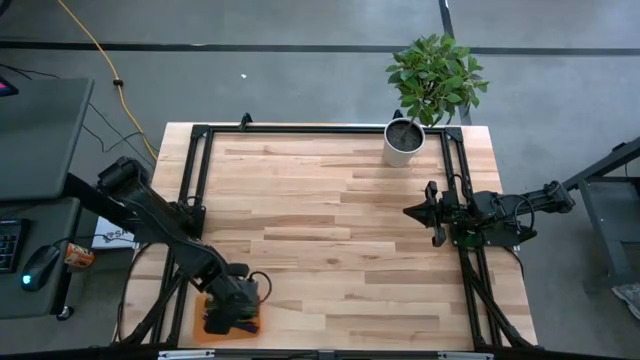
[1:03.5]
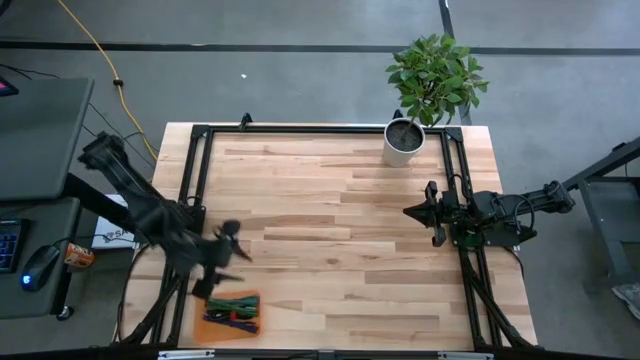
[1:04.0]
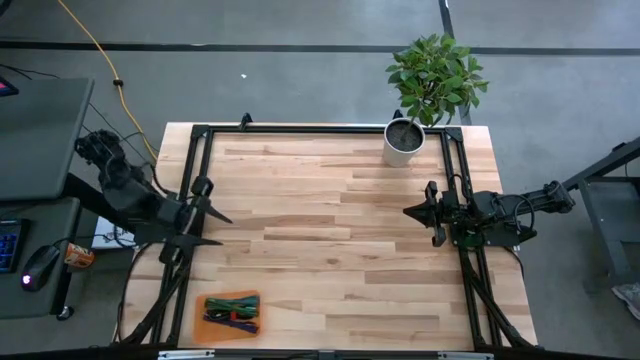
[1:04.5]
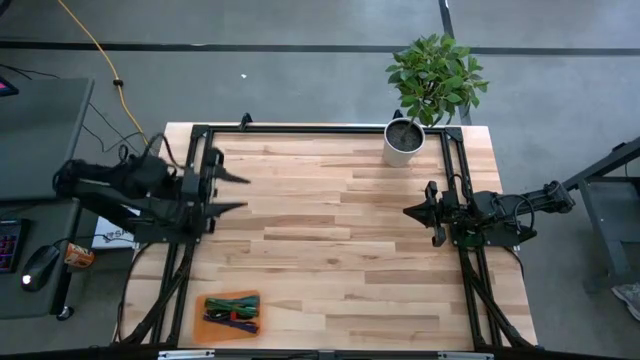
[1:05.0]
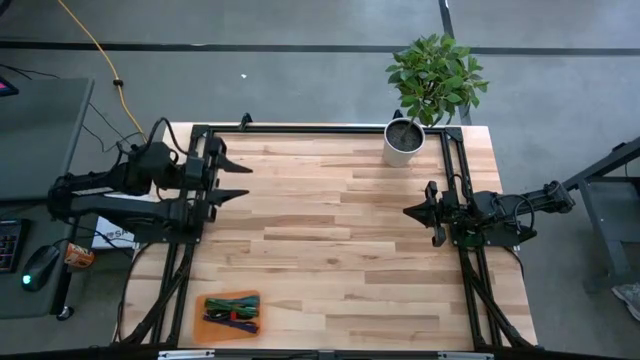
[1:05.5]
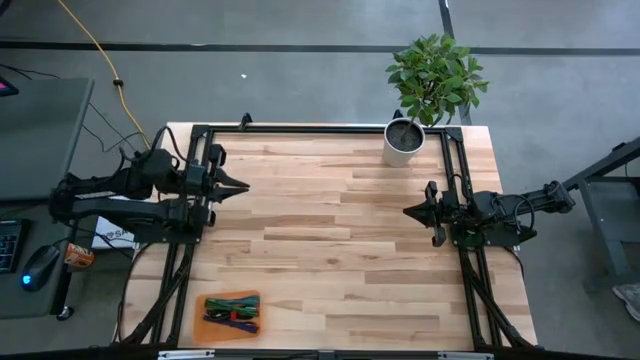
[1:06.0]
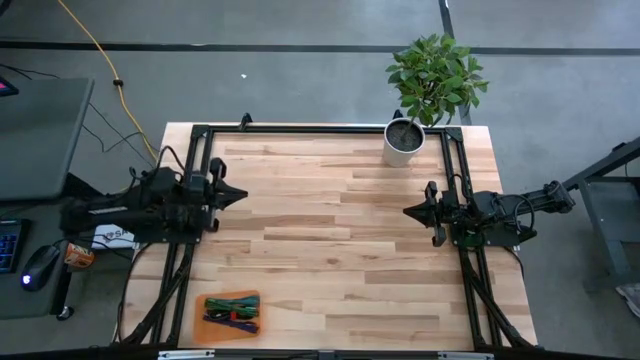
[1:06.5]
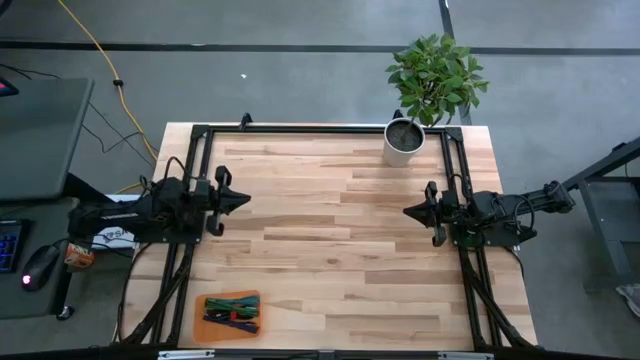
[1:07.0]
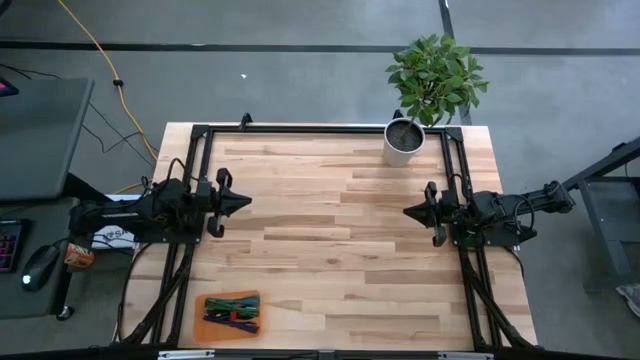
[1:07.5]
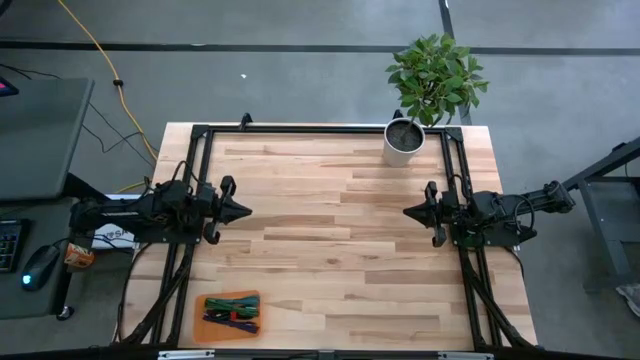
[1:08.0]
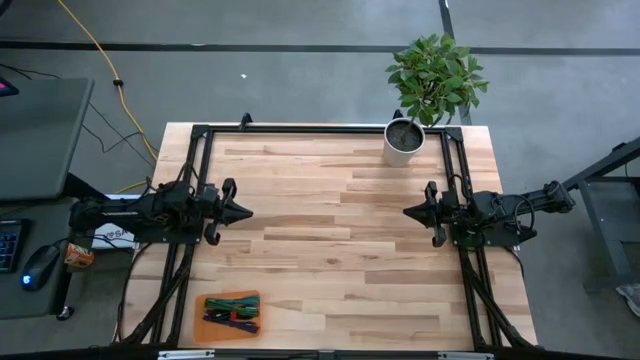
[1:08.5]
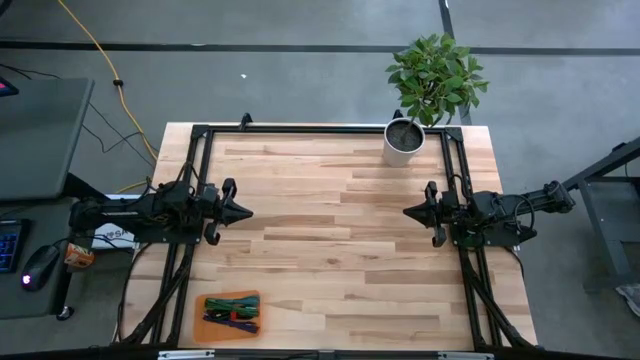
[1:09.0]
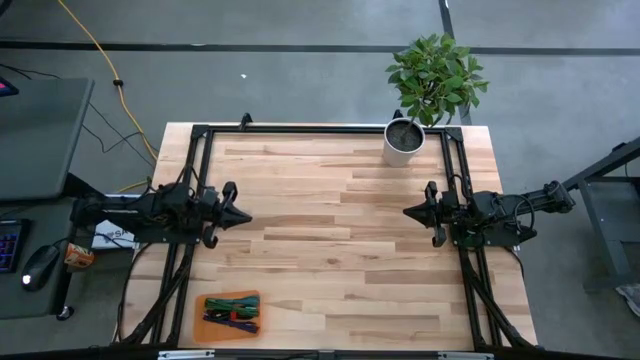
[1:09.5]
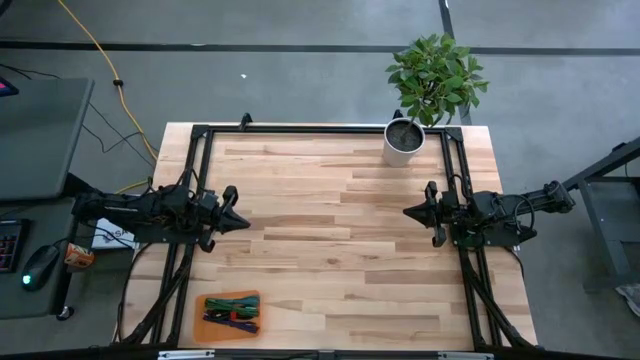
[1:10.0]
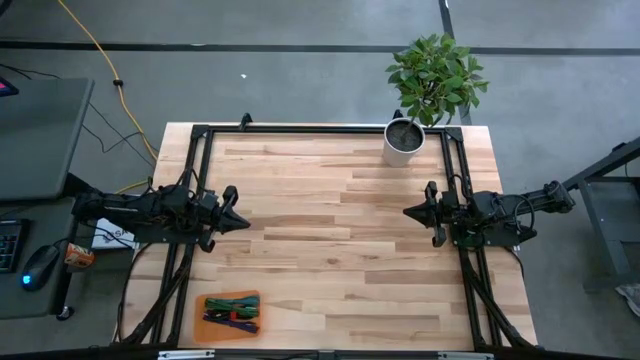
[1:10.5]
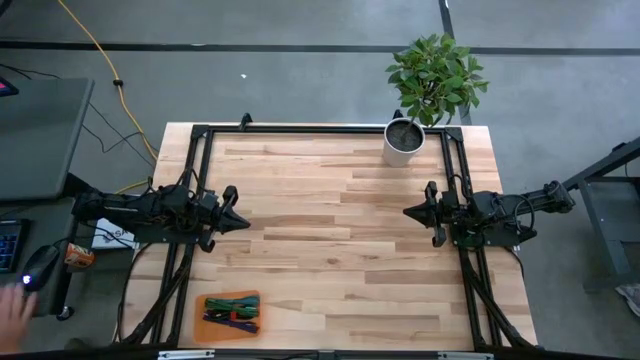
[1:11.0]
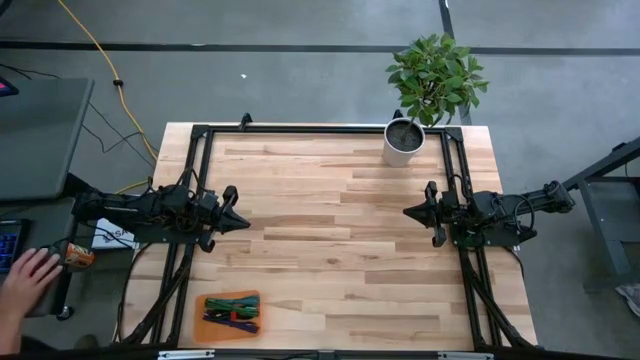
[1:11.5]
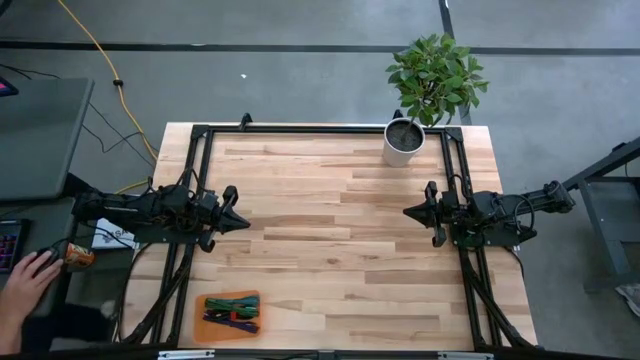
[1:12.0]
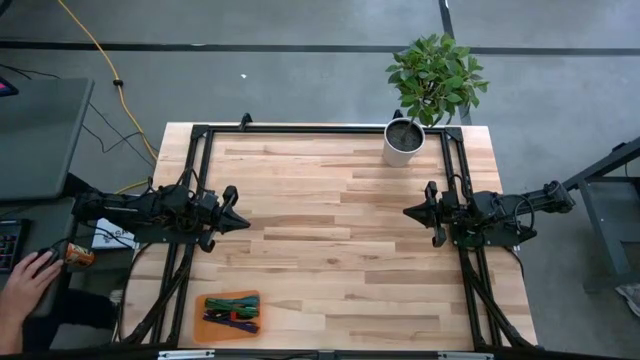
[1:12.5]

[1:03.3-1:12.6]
Task: Pick and place USB-C Cables
Return to Home Position

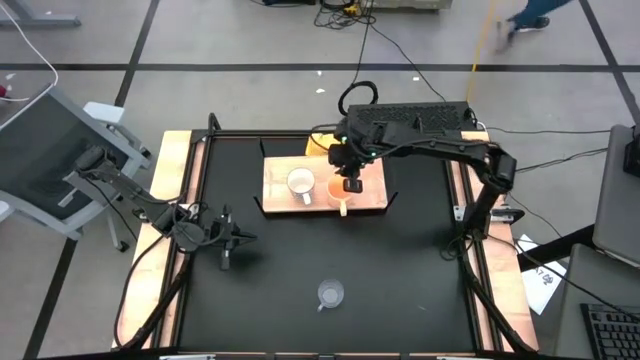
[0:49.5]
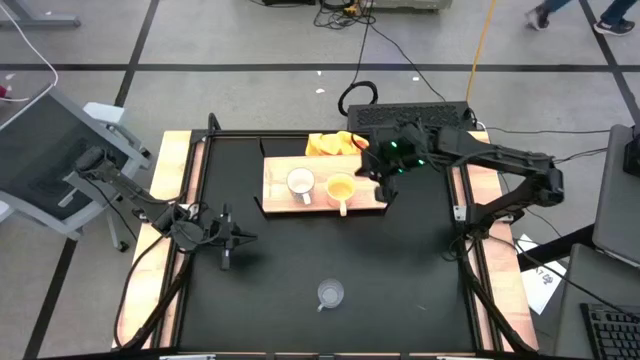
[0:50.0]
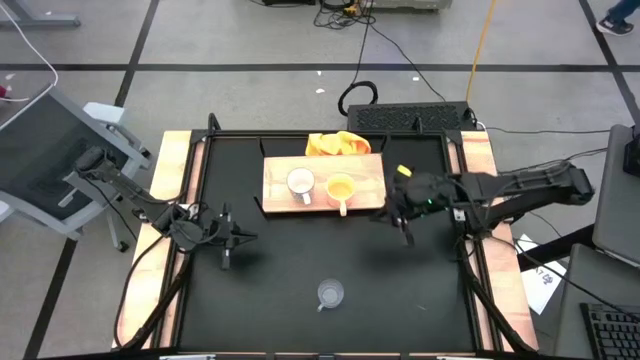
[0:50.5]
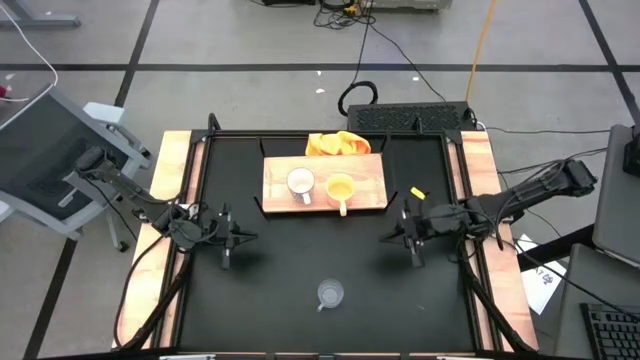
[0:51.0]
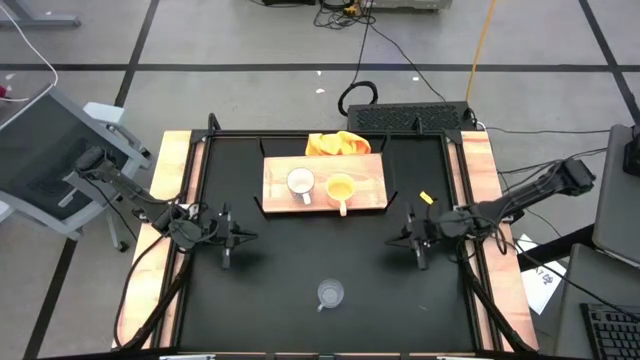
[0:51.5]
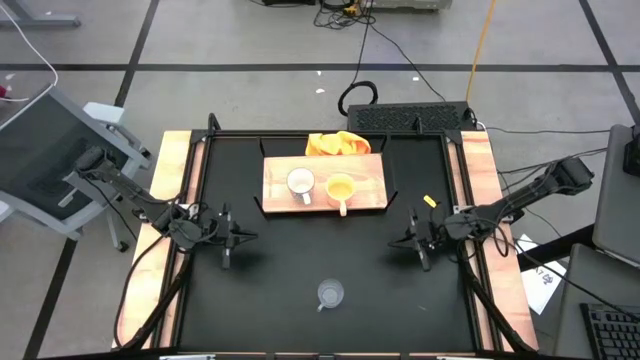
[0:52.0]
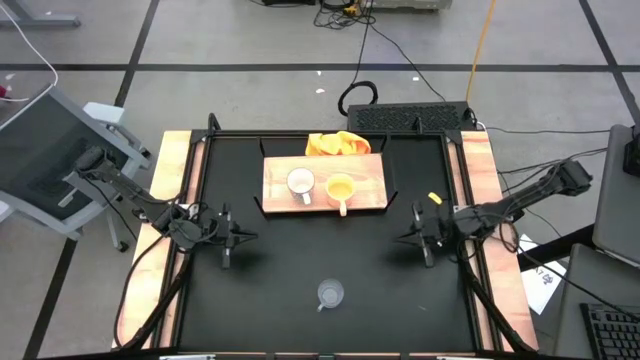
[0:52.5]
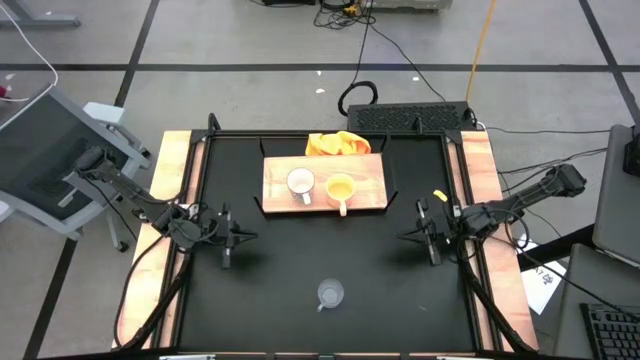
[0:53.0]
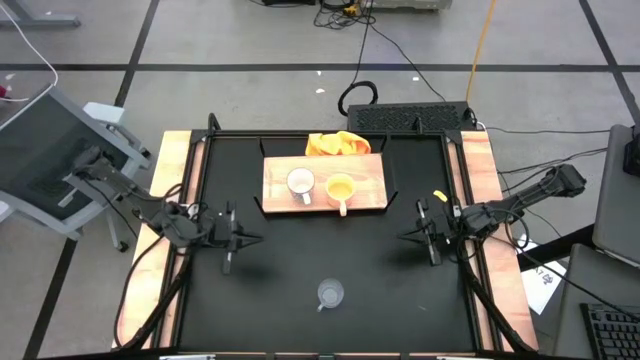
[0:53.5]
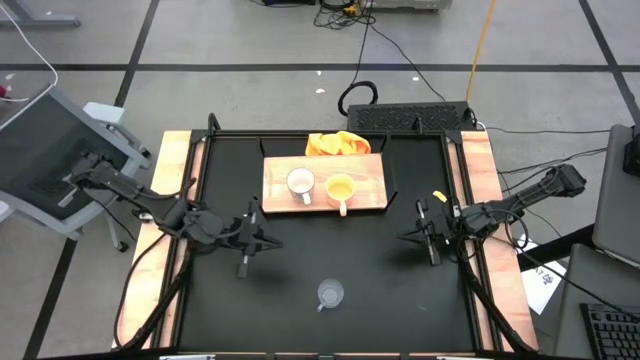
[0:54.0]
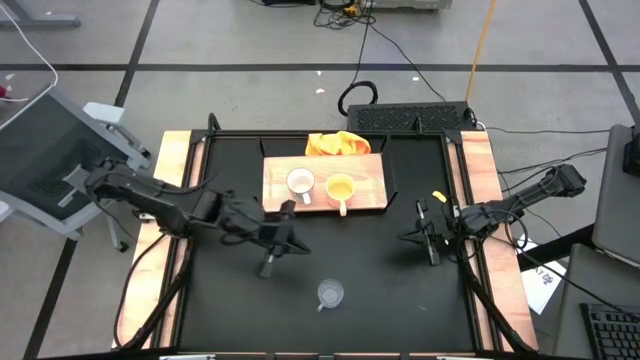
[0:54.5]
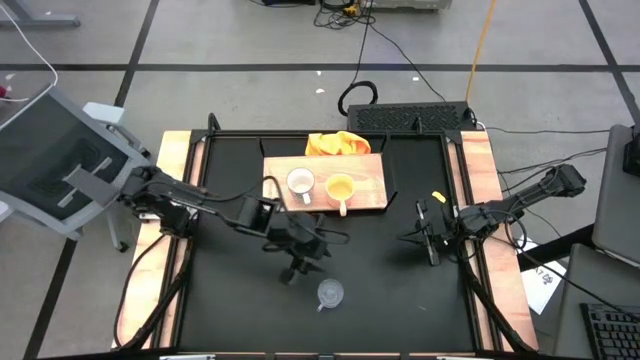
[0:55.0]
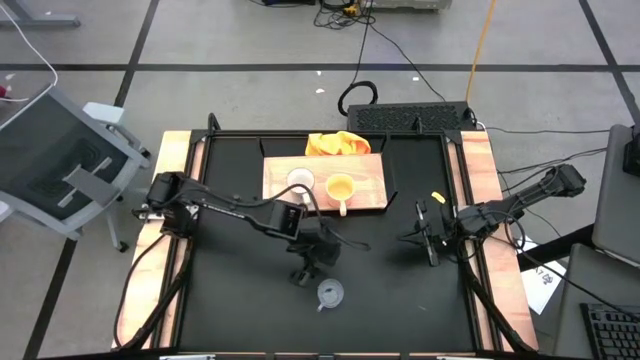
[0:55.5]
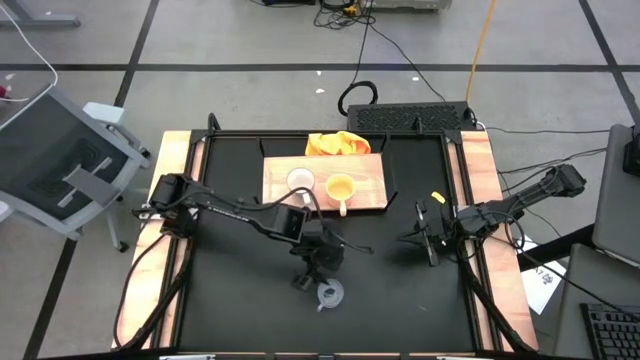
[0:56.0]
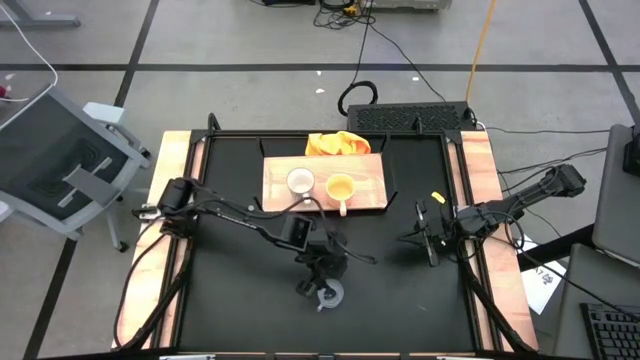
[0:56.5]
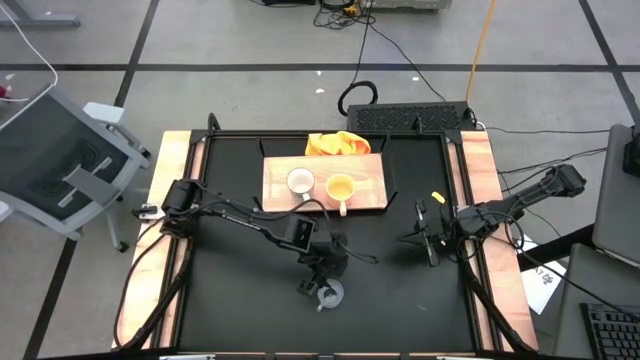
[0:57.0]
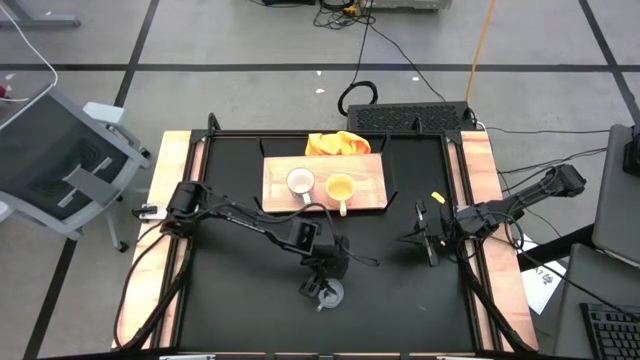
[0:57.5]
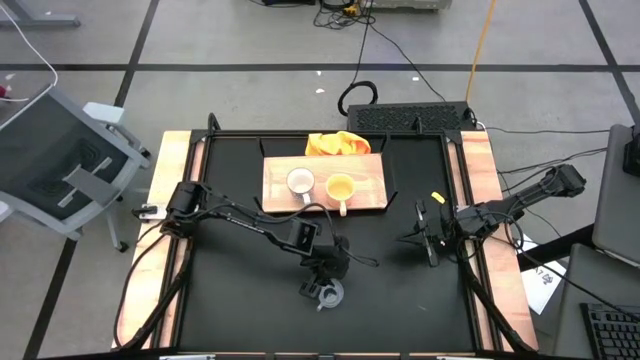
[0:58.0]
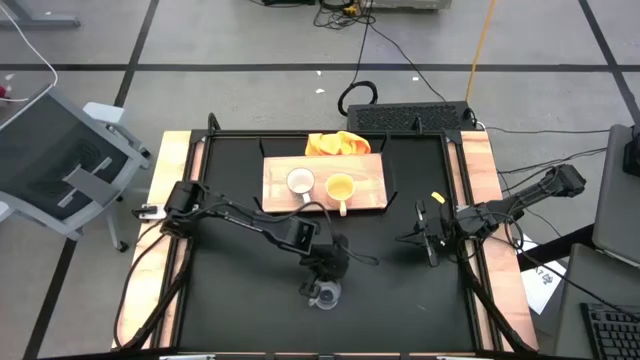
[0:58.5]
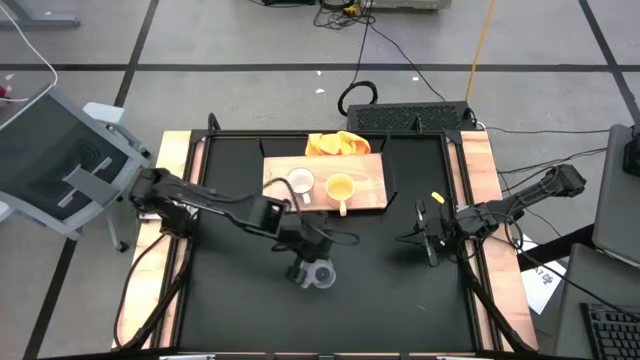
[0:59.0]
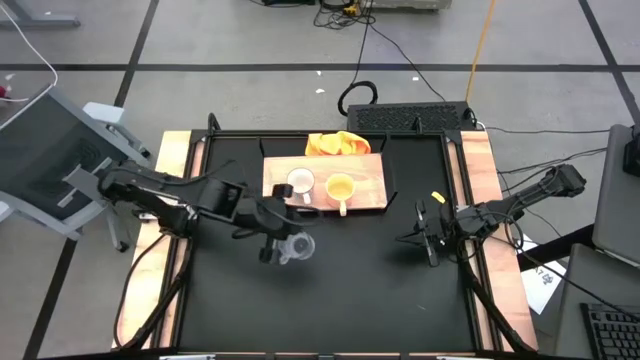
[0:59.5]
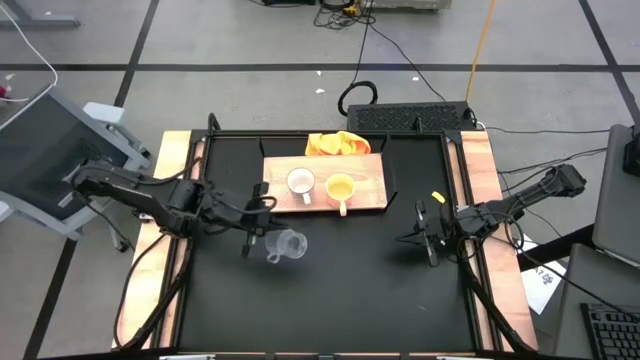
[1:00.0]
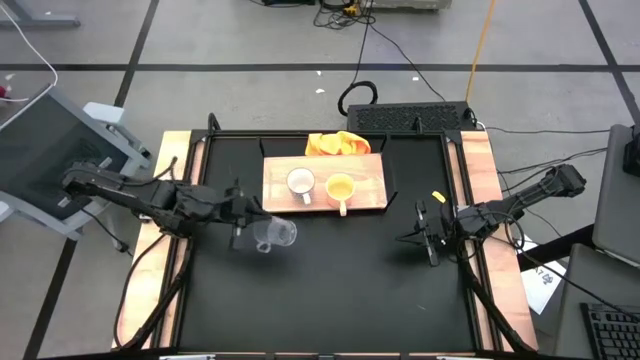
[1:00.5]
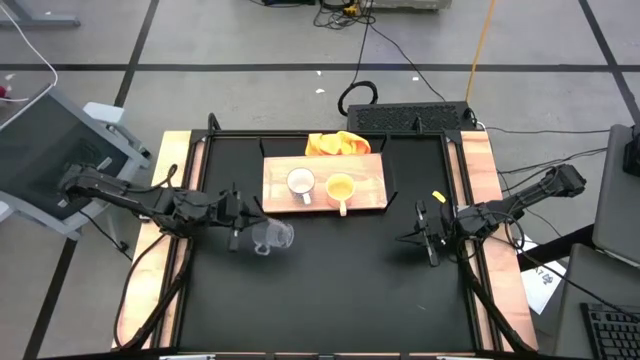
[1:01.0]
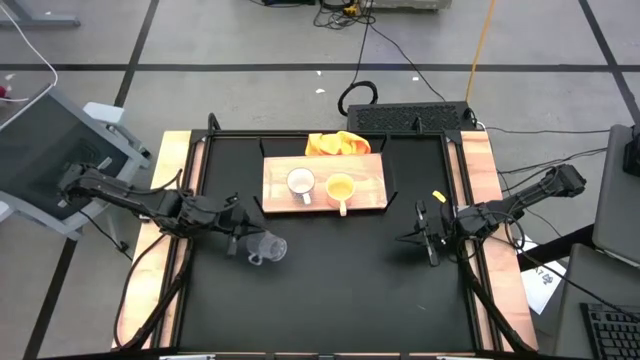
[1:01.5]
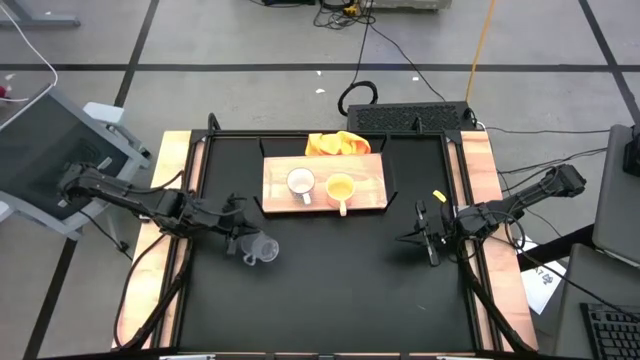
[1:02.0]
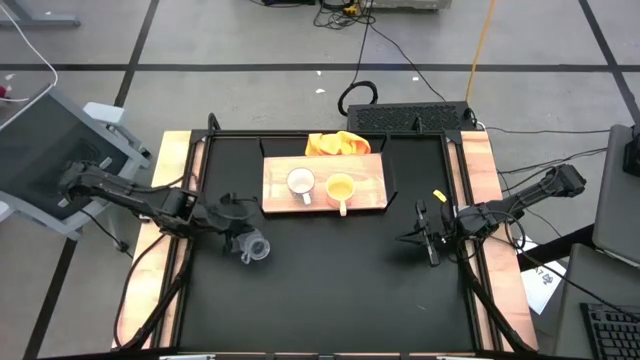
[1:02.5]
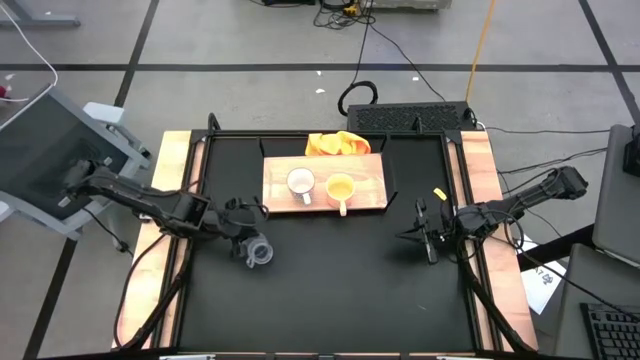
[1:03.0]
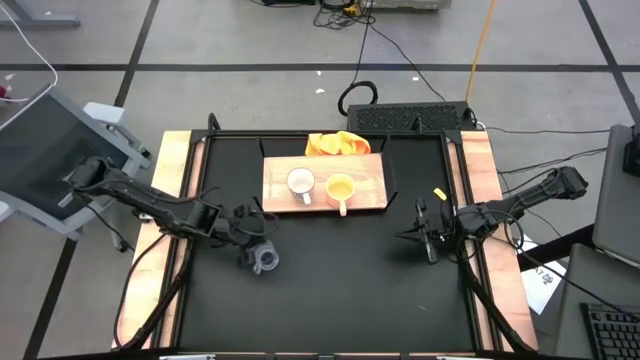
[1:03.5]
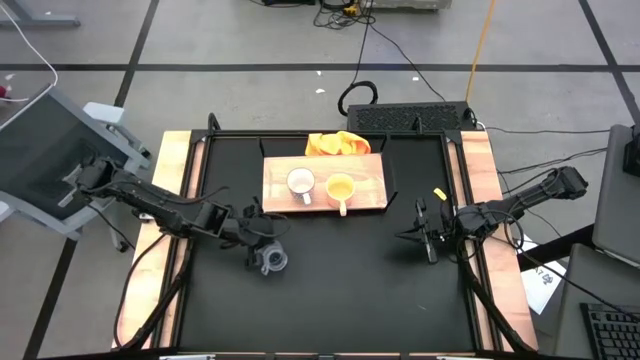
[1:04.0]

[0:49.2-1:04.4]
Task: Stack small to large cups/mugs on shelf
Put the transparent cup on the shelf
